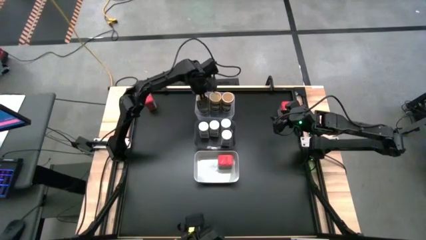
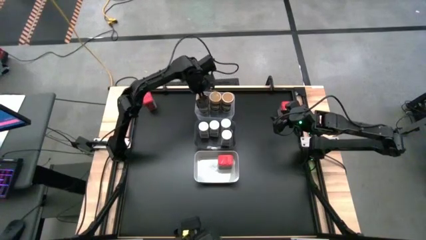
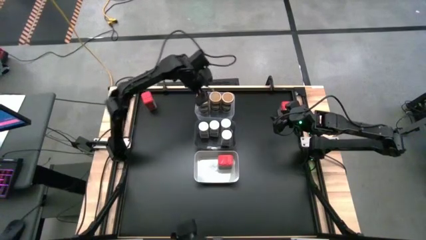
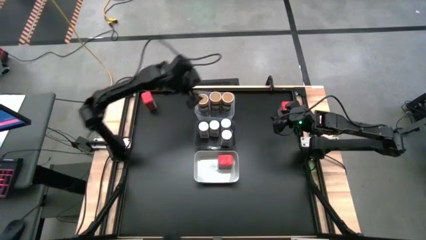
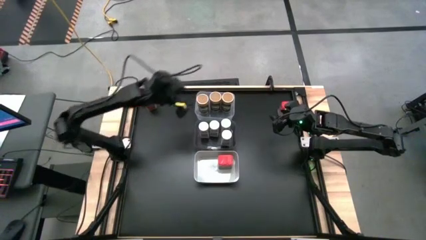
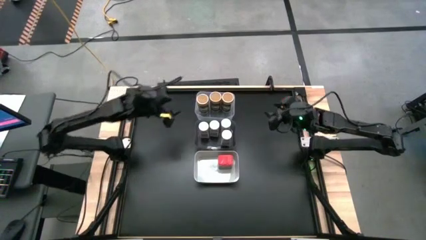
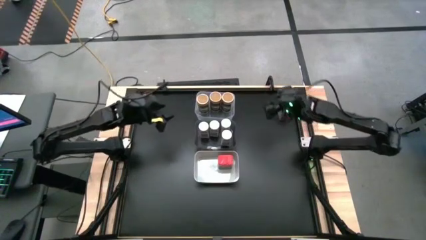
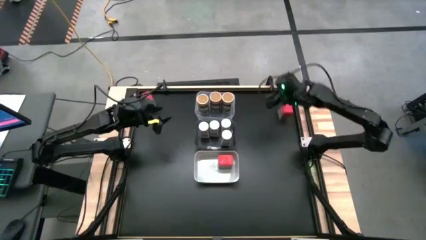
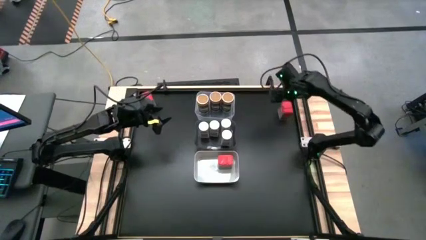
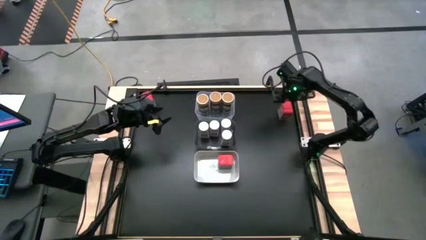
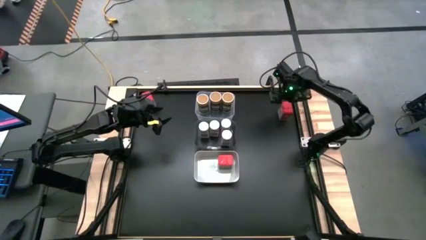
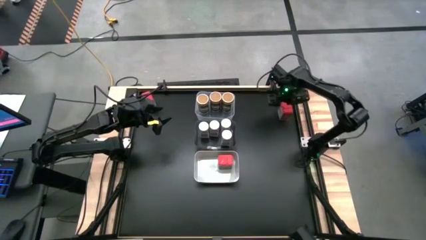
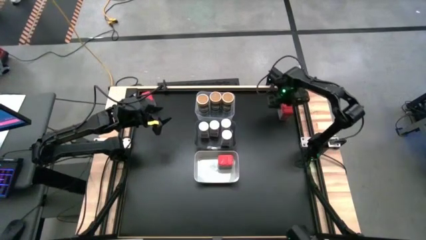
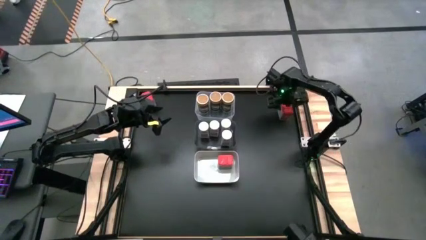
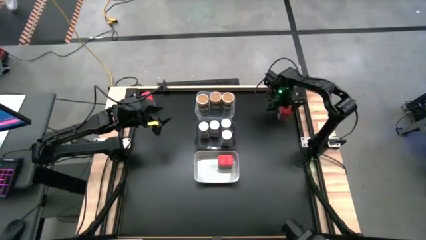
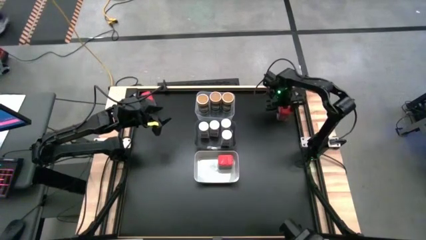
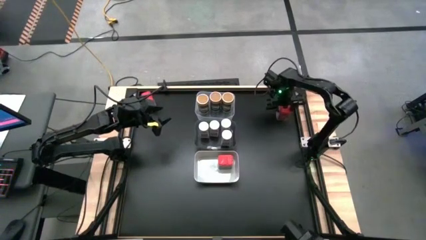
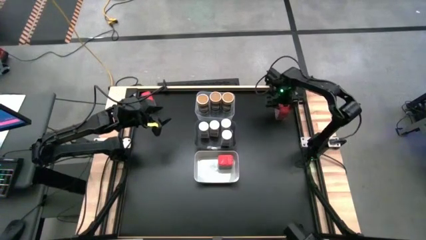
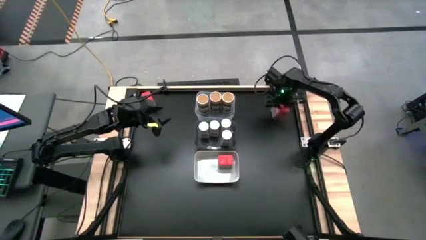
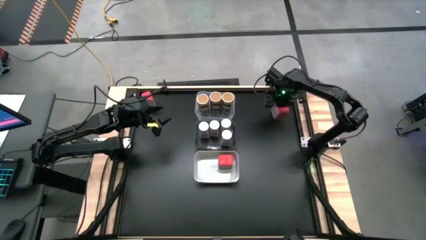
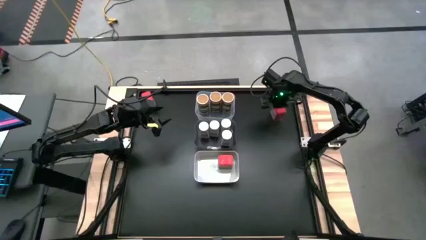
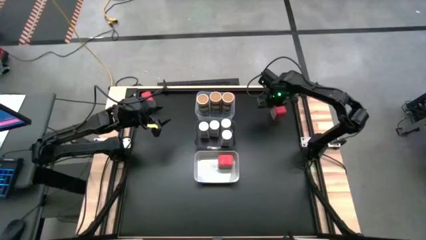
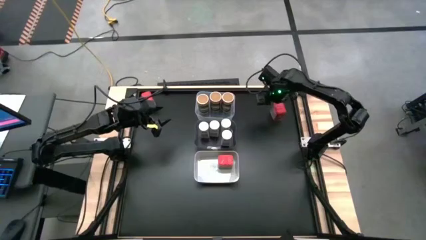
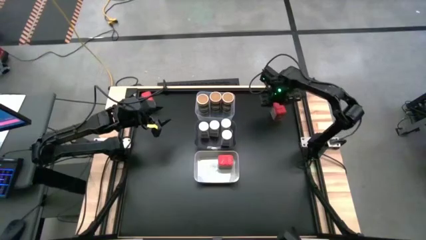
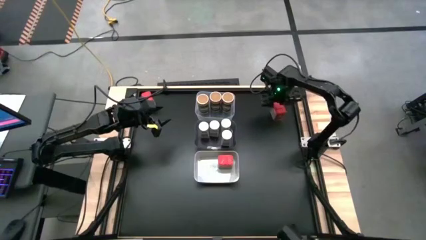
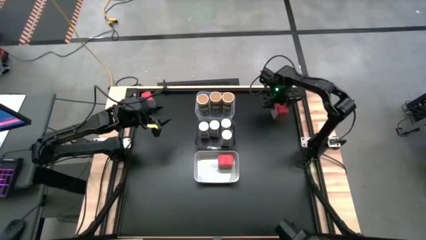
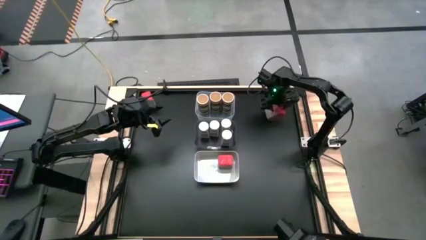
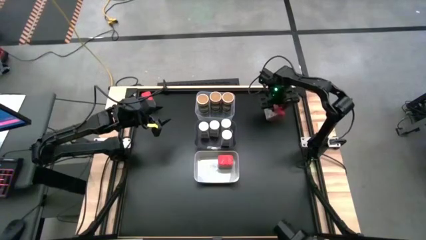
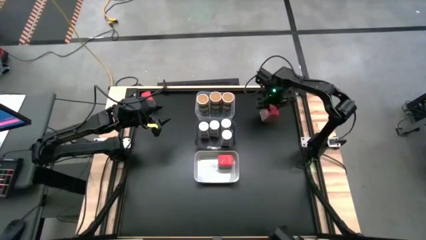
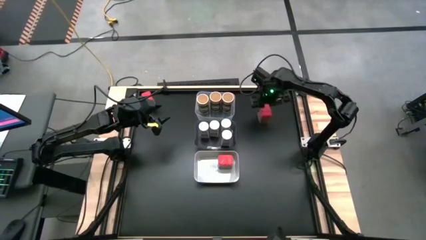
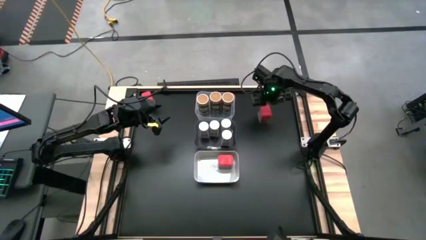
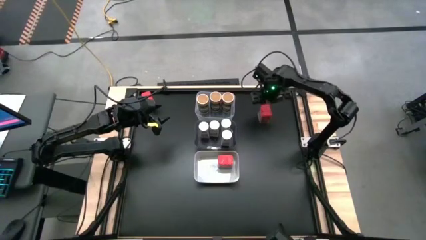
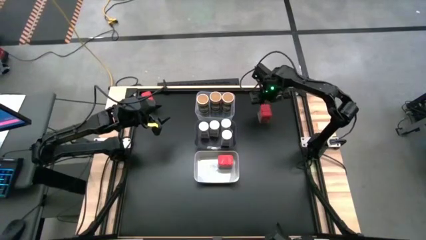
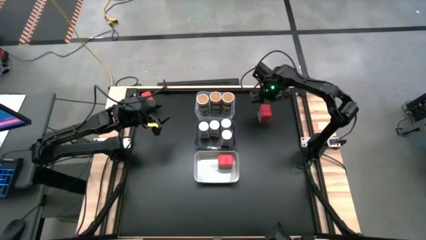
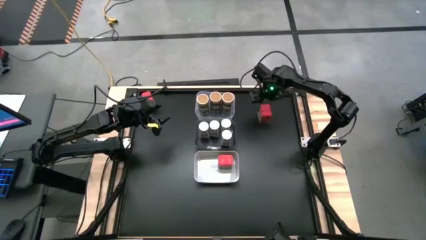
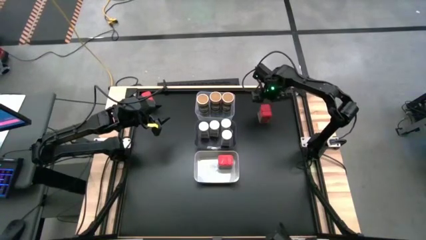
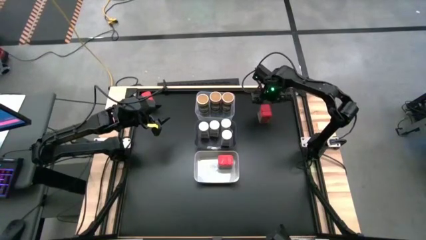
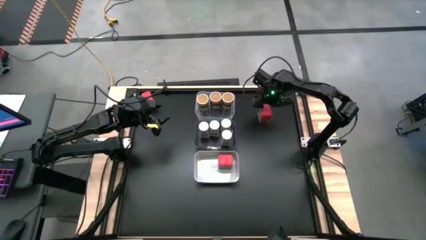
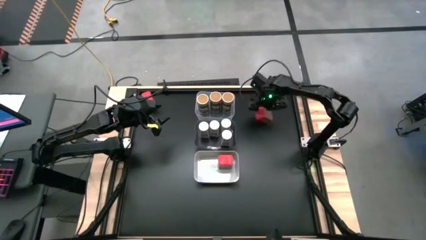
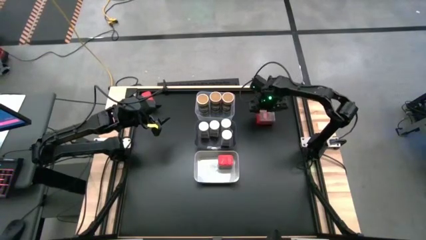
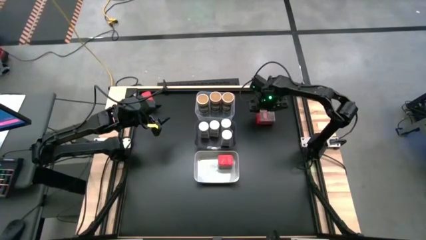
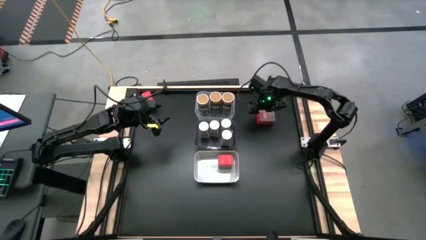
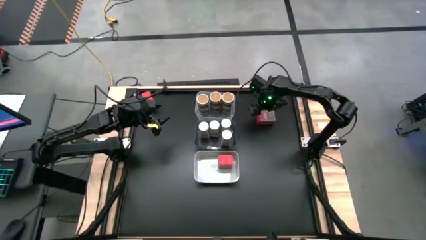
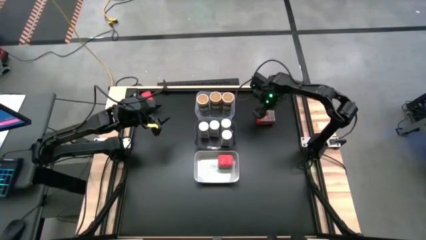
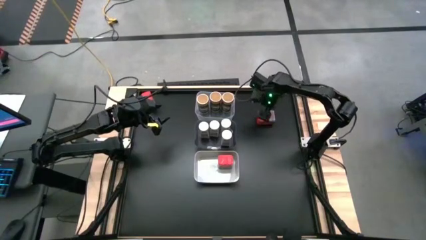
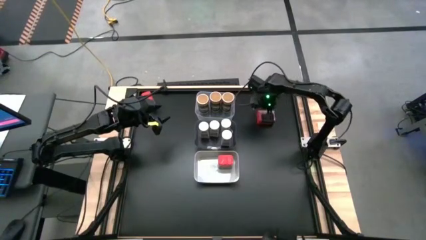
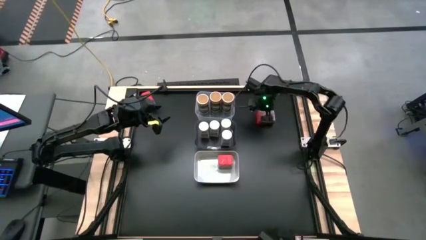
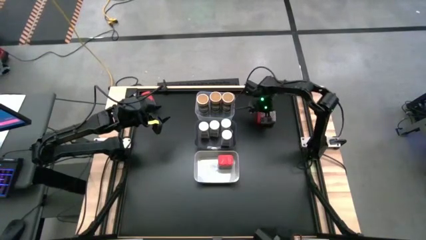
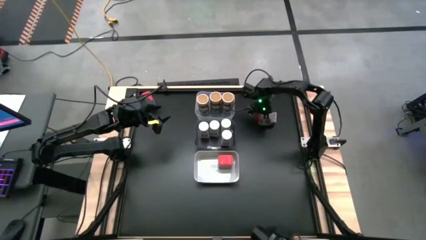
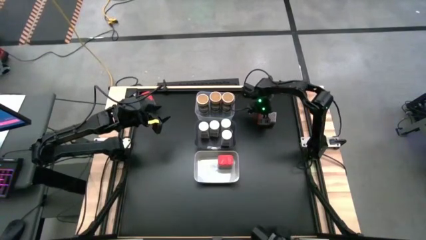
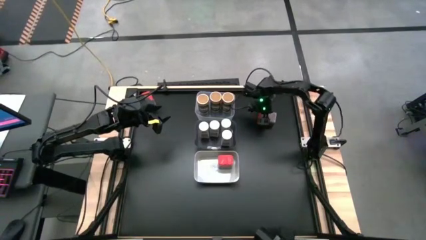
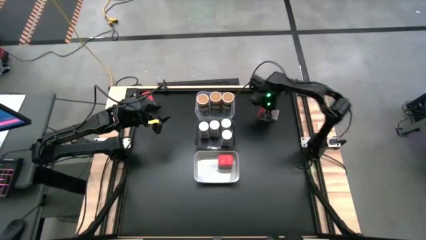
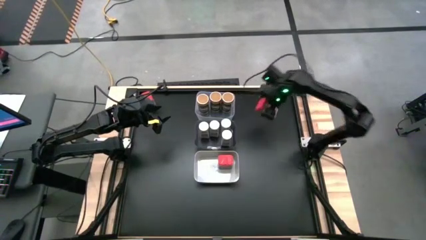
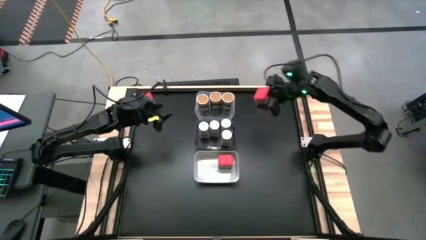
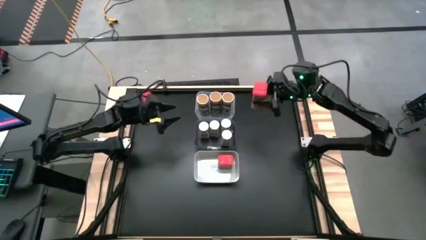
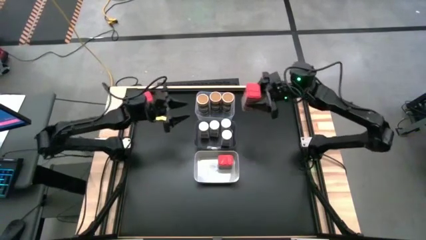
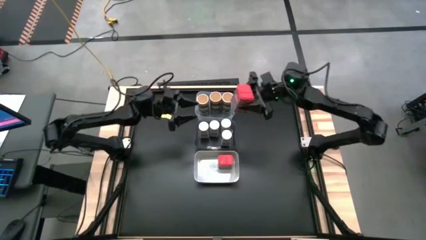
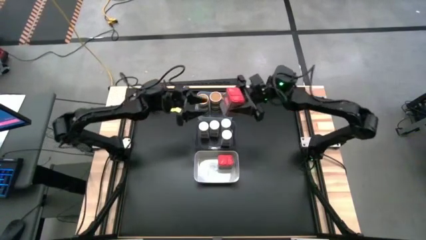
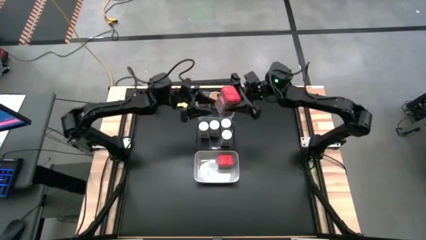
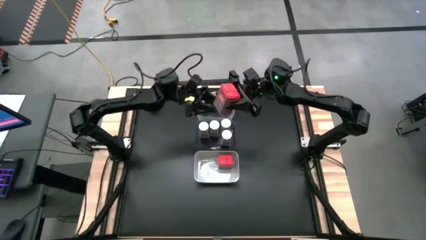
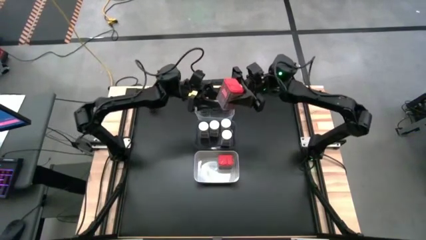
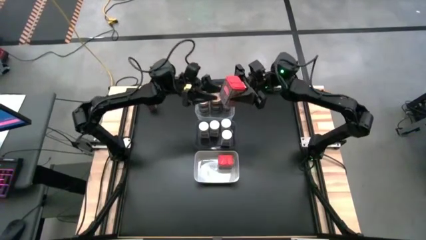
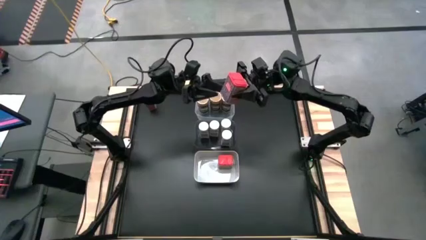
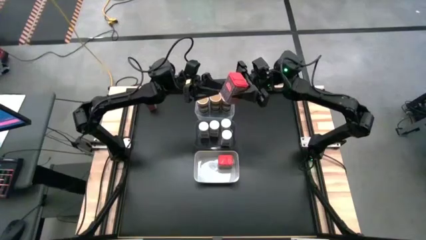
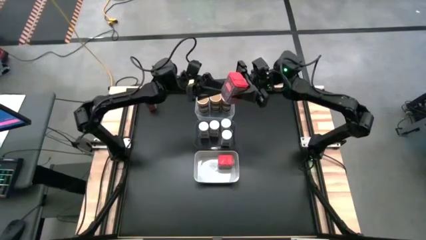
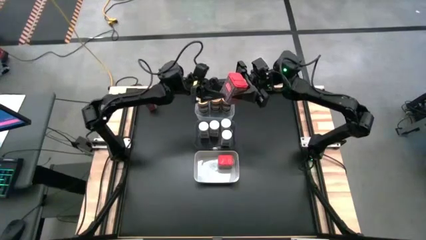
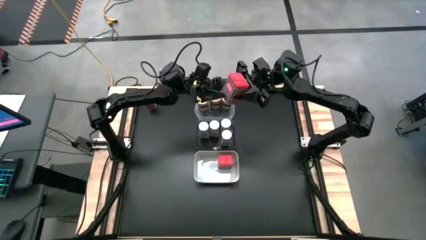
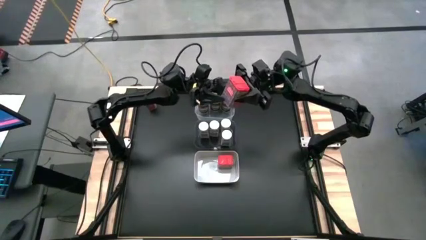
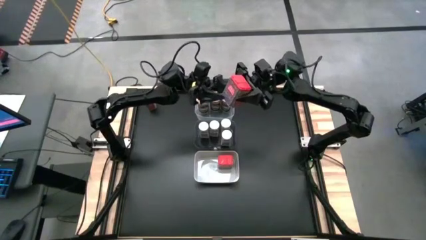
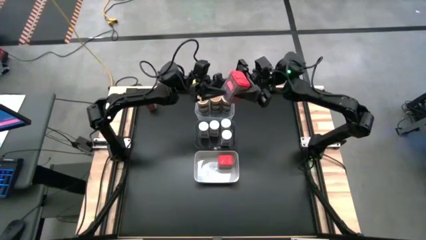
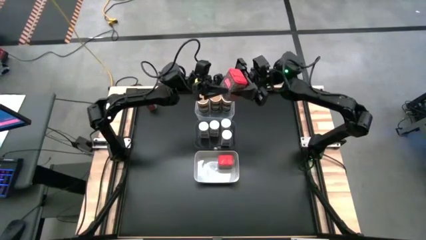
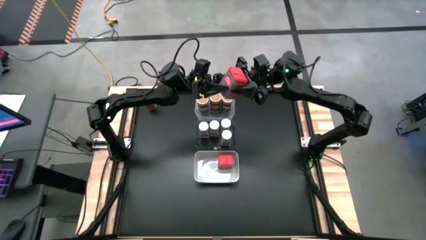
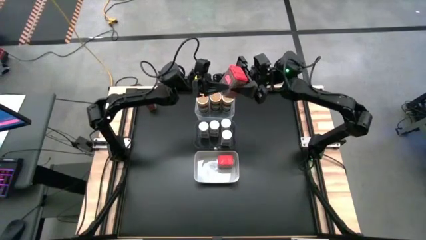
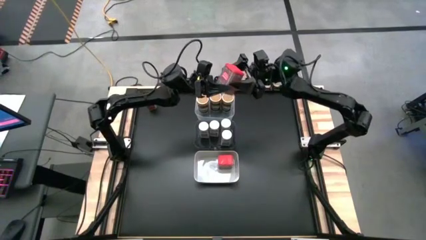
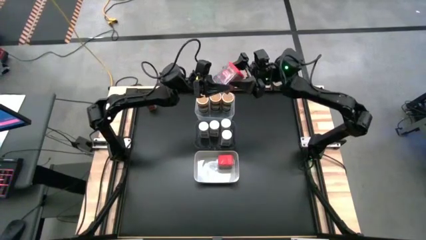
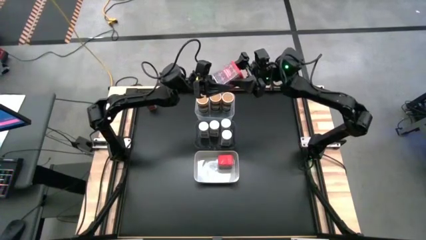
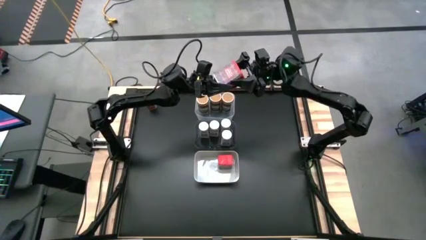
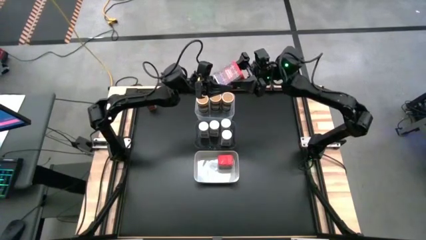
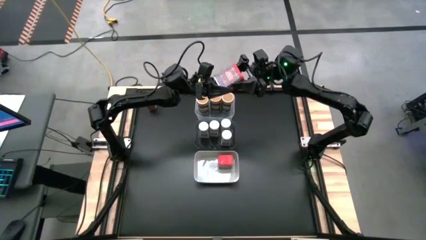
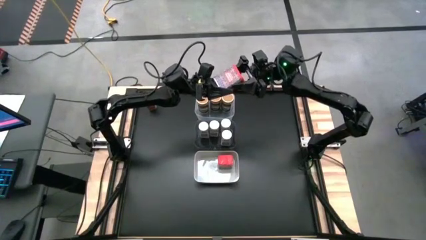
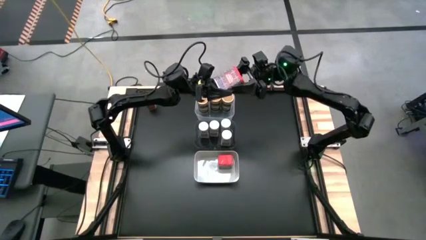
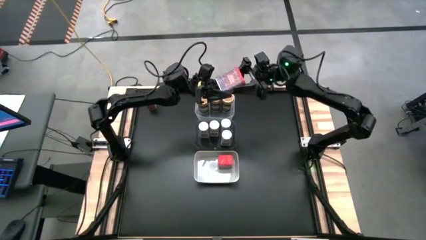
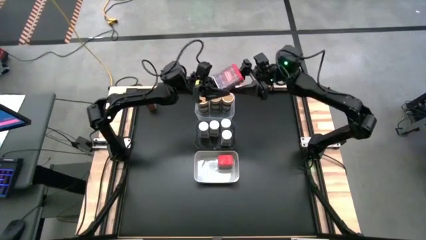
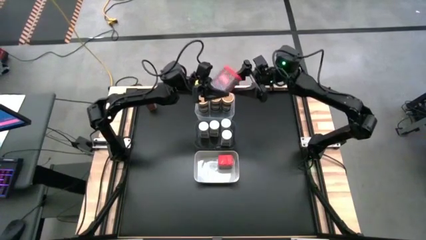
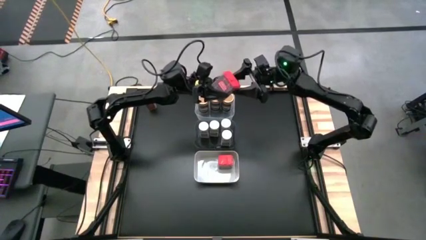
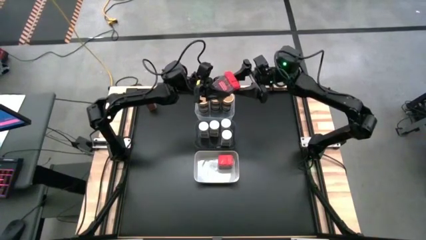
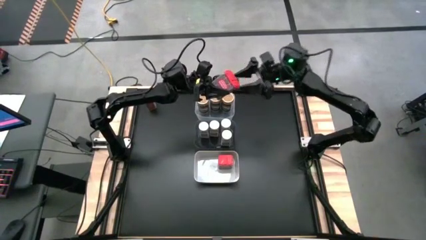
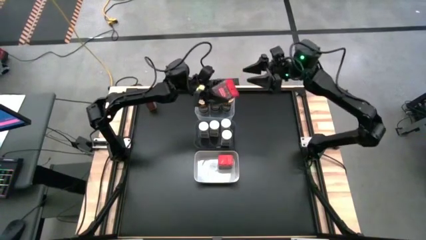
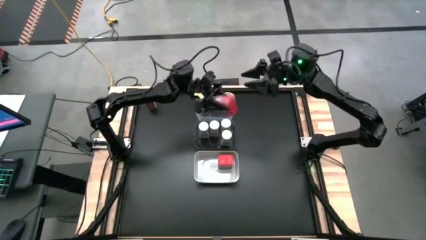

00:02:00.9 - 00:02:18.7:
Task: Sort spices by type
Put the right red seasoning can into the white bin
